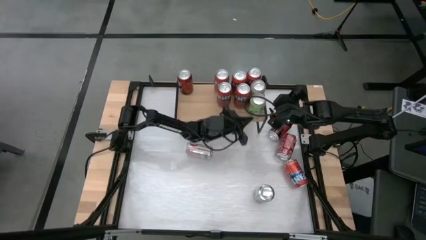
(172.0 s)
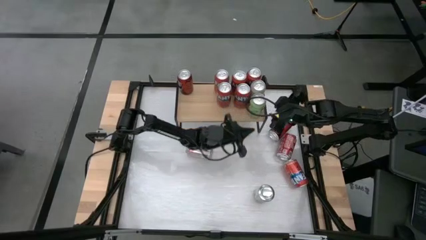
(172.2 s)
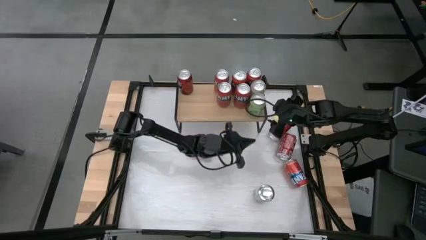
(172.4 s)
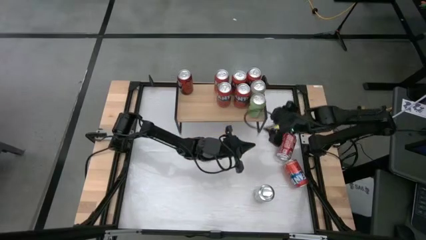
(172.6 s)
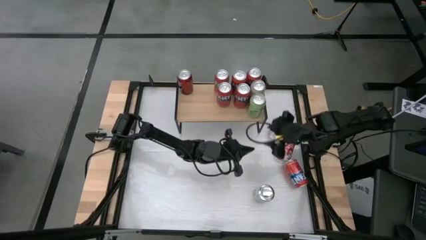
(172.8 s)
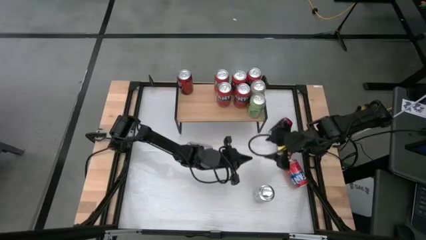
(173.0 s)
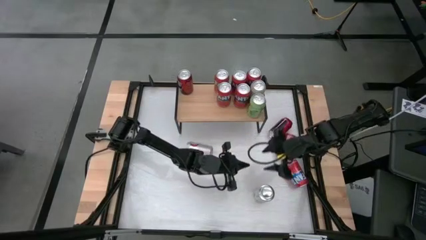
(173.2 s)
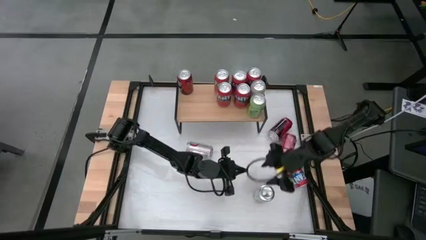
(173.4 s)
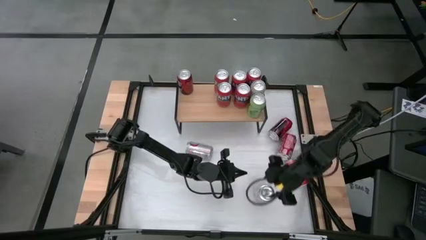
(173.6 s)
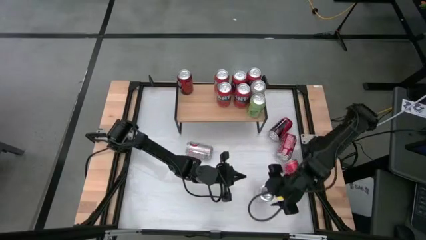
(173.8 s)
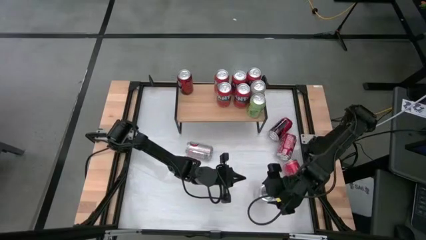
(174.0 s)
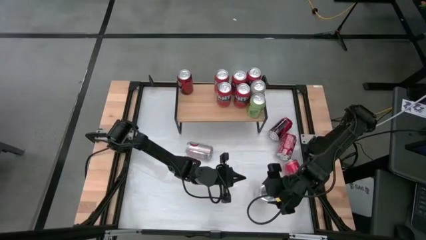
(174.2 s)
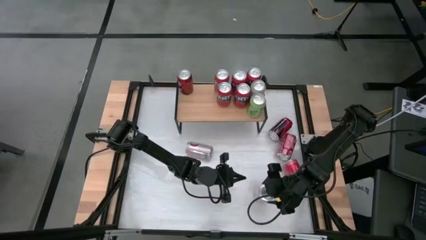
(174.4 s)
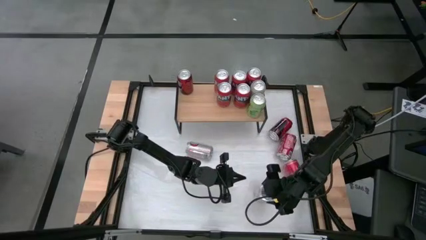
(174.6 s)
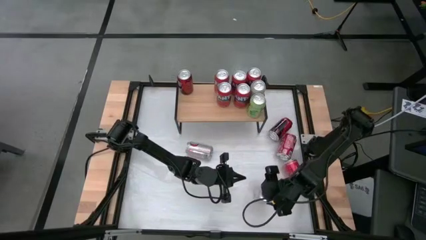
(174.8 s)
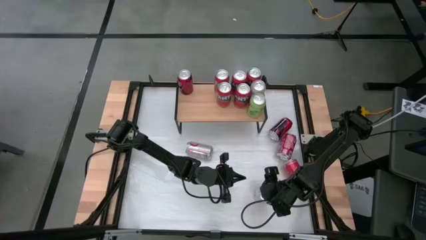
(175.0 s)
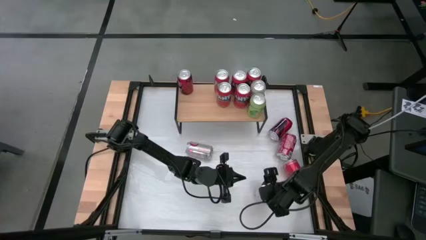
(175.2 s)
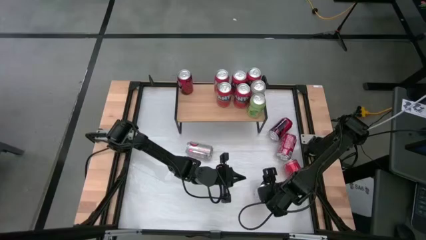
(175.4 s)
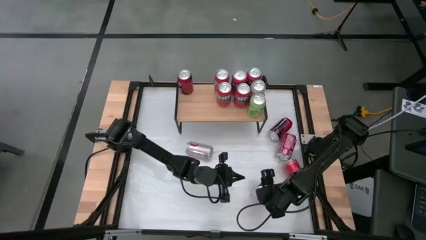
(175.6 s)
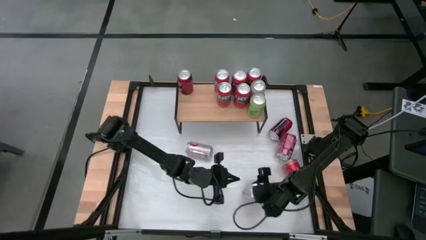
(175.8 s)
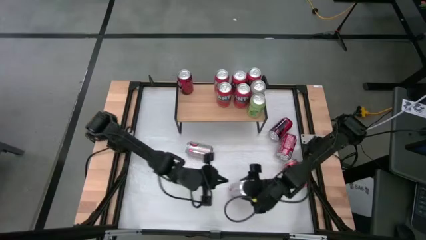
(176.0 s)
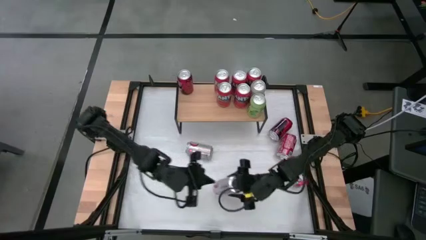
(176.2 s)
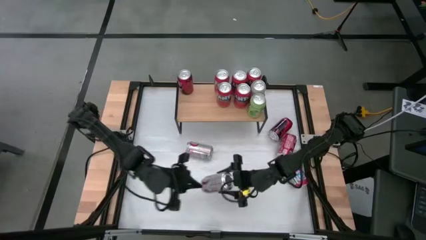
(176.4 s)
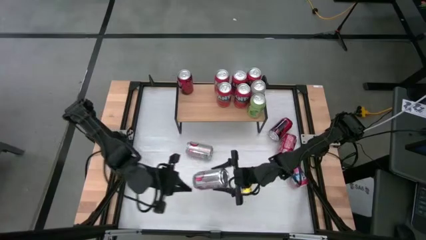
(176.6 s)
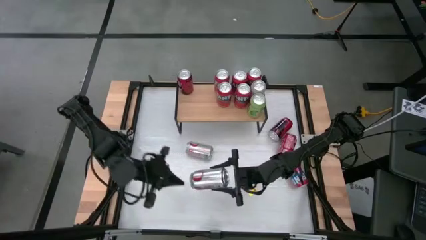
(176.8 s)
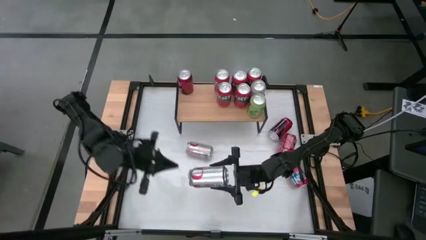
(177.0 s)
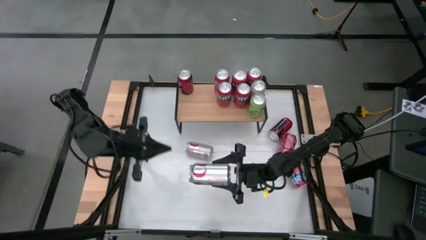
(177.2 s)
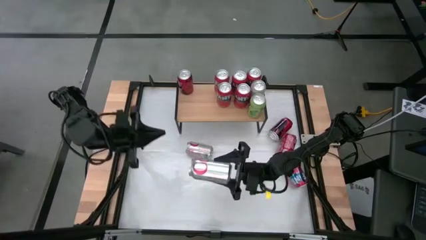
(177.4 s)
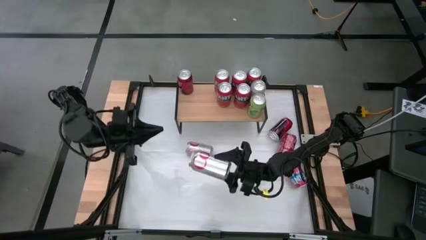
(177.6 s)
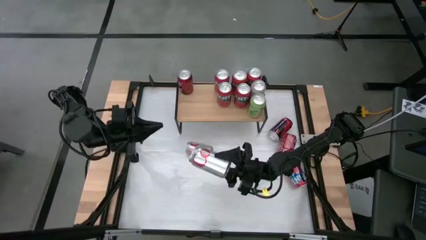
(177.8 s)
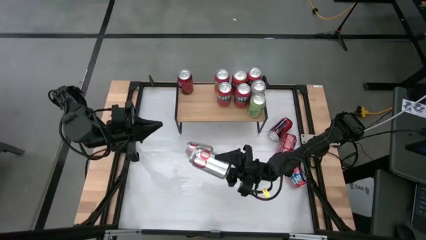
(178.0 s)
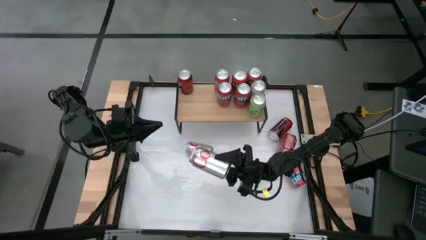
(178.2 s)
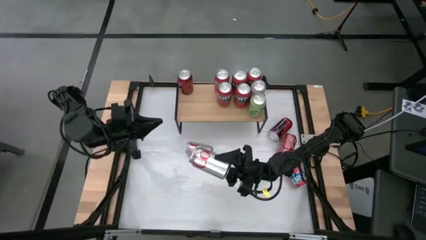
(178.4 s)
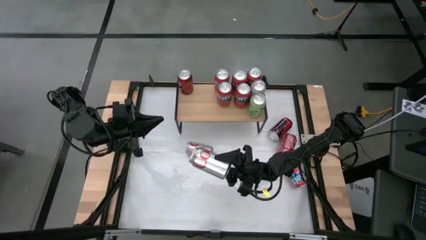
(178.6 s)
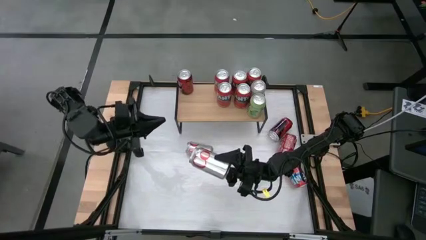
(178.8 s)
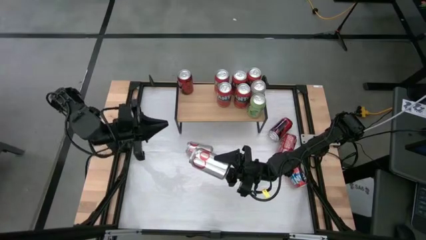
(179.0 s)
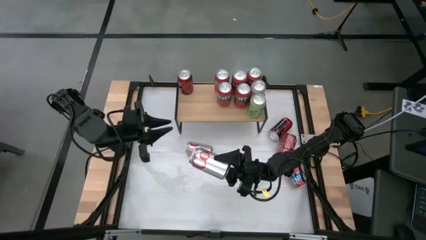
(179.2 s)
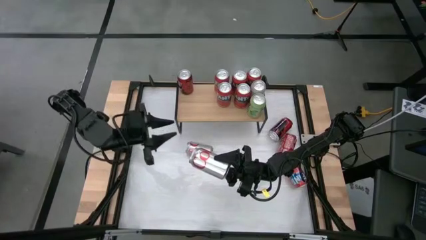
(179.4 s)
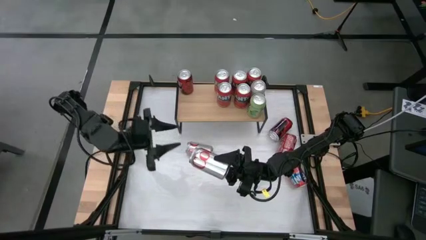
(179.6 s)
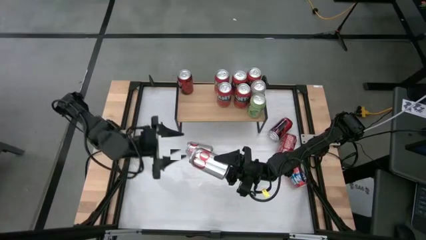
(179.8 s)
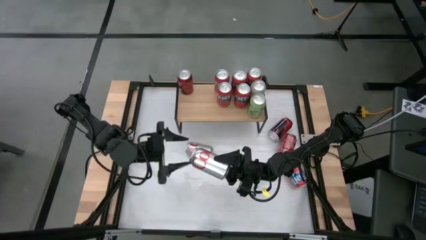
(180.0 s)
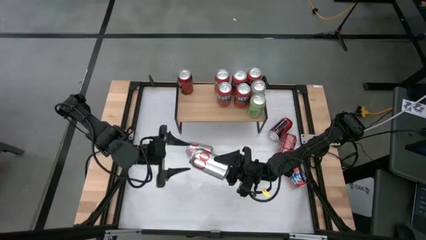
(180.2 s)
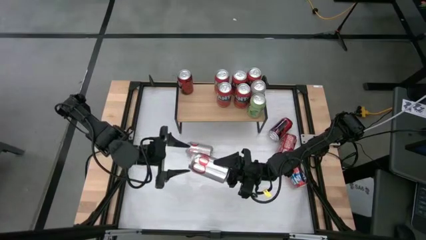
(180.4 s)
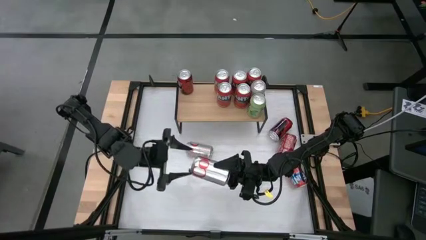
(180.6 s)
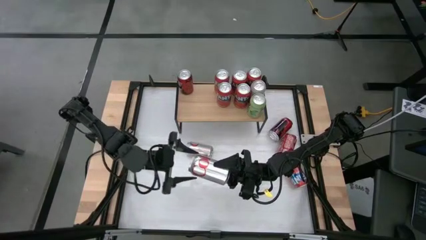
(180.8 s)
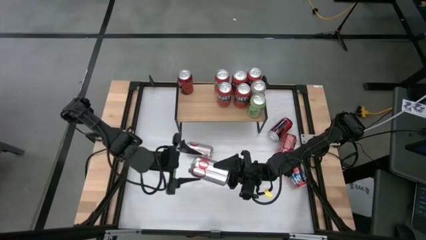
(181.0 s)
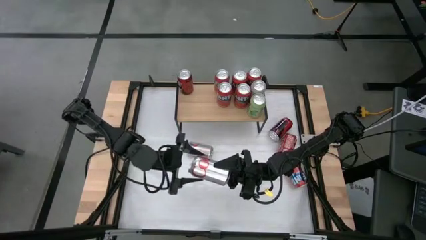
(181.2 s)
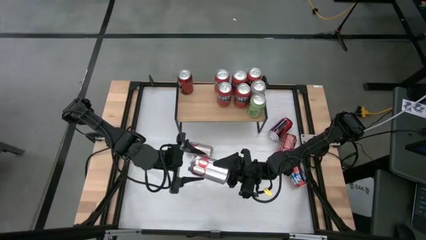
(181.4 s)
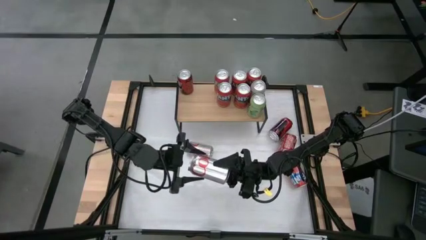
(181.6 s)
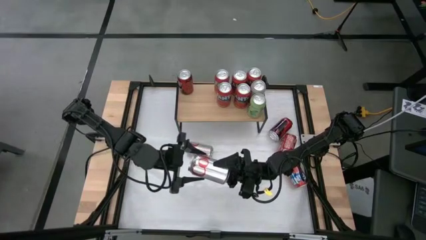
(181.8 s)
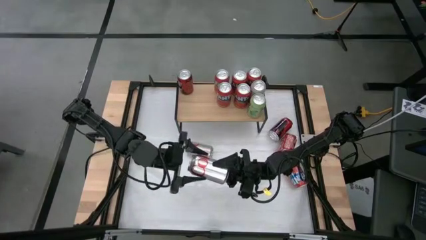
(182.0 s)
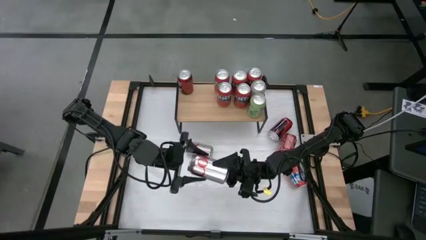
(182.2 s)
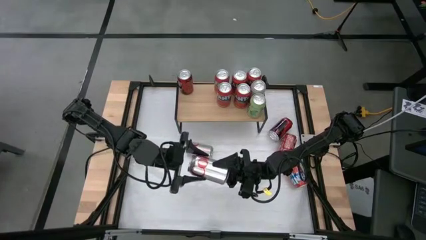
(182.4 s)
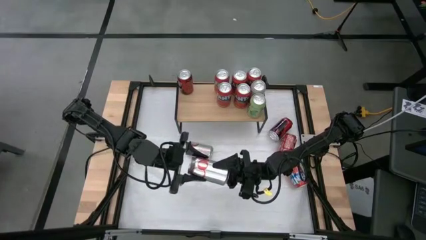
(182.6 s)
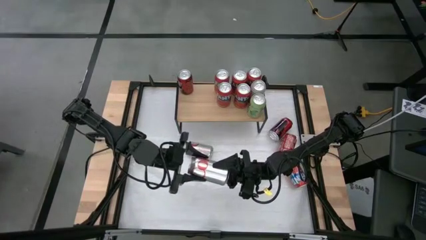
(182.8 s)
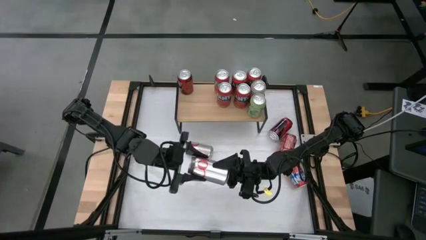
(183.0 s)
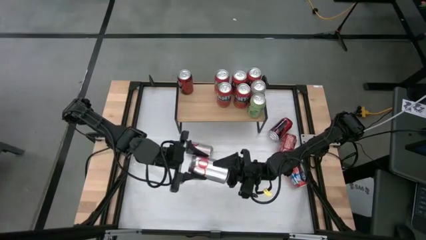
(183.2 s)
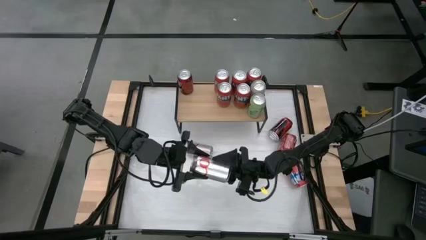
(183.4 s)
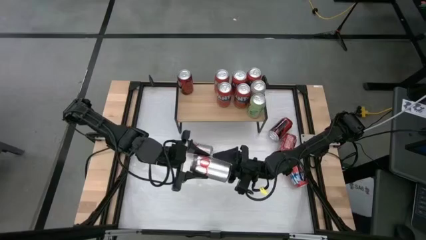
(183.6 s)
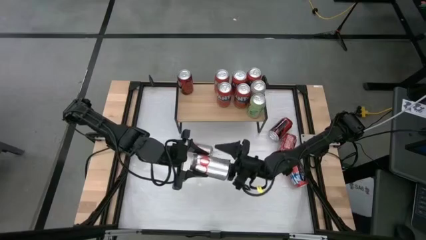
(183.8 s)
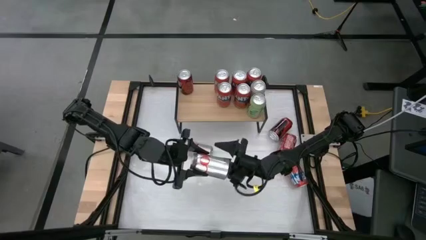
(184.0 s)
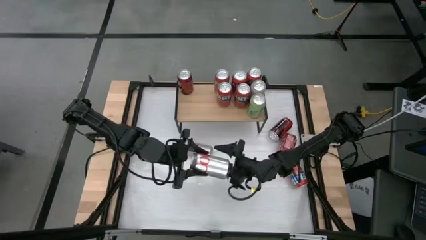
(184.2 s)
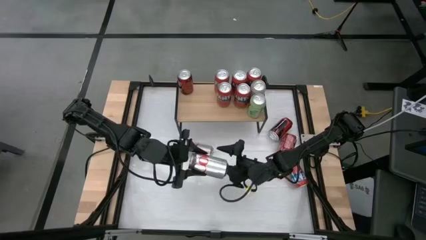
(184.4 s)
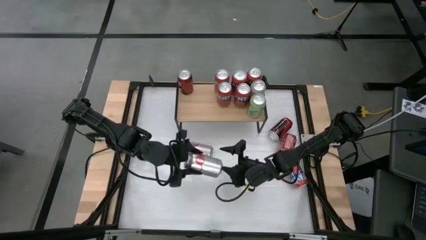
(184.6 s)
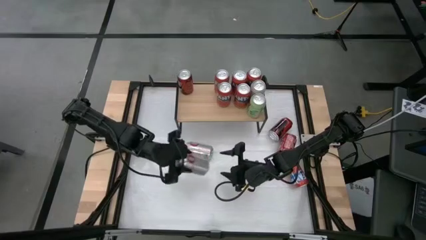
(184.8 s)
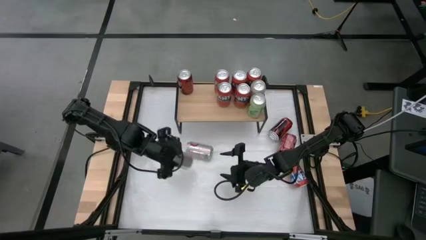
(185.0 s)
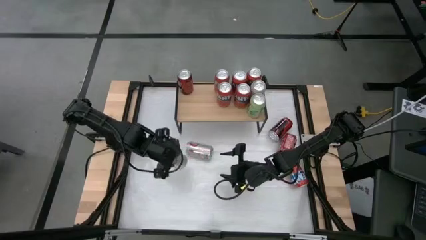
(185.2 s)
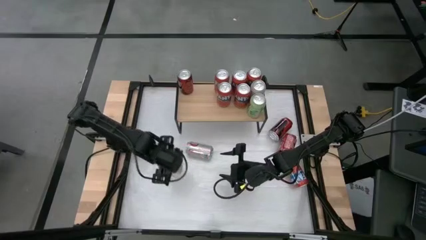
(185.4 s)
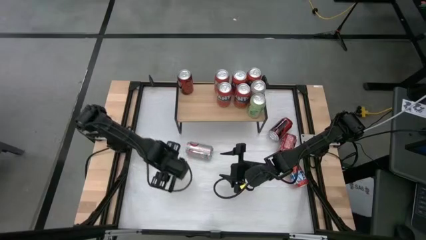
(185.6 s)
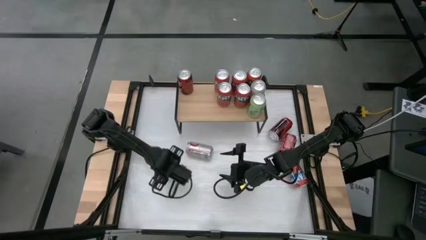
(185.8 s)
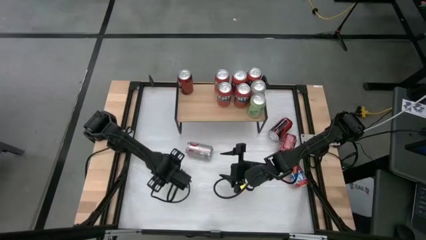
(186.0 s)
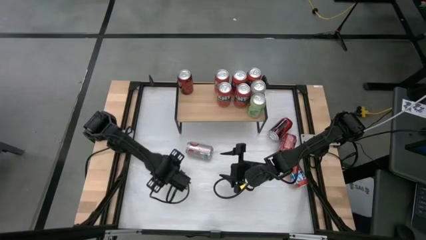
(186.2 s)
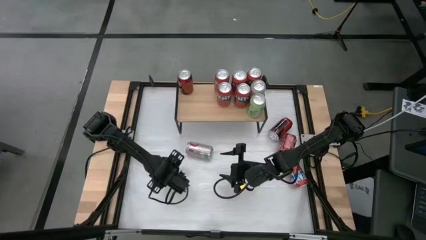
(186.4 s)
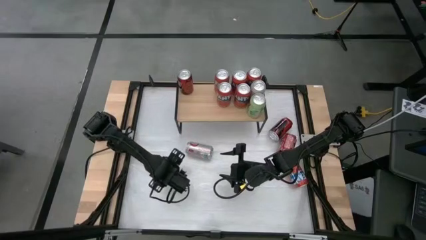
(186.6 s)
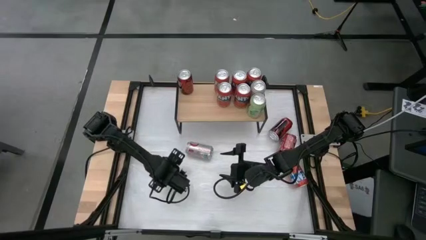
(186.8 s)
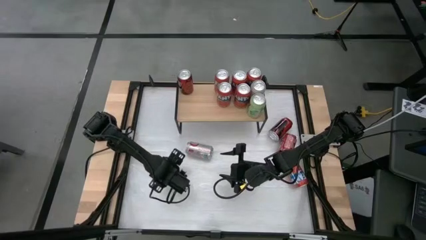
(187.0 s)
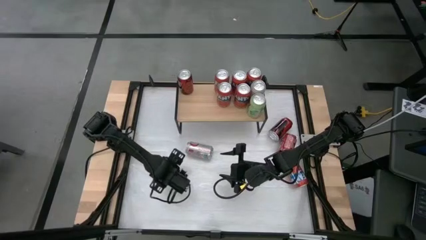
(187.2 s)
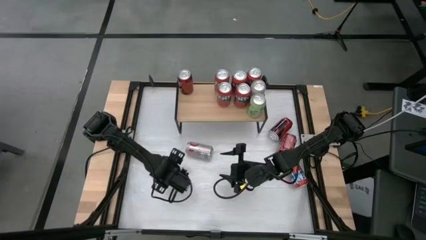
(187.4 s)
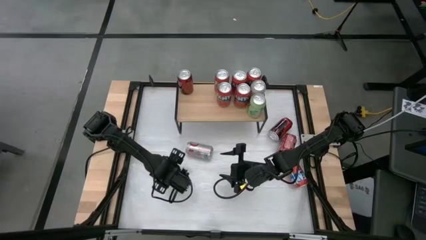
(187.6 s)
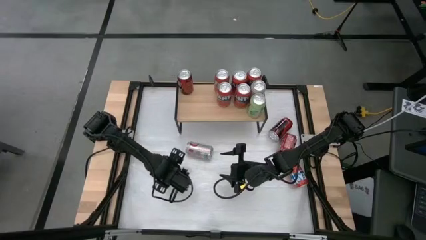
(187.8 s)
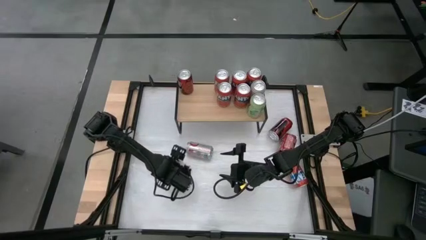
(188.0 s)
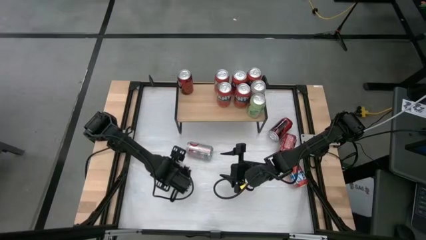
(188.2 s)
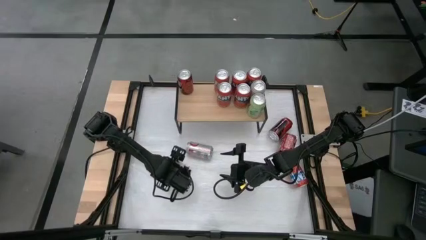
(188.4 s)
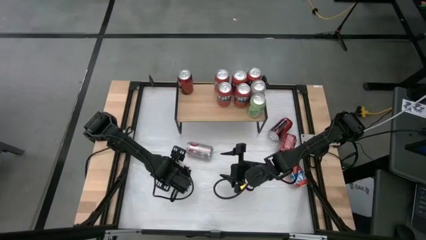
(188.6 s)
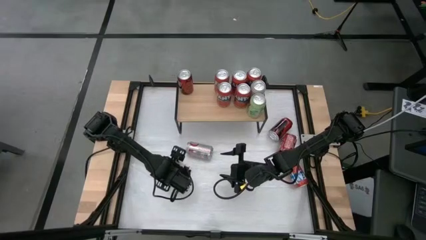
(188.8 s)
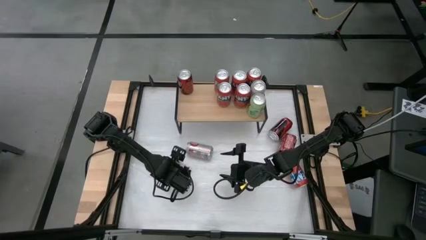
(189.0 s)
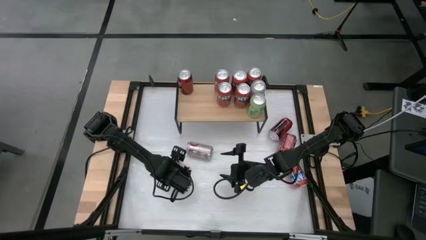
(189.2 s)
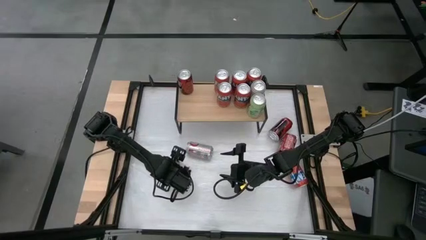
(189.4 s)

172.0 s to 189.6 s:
Task: Place canned beverage on shelf
Put the red white soda can on the shelf
